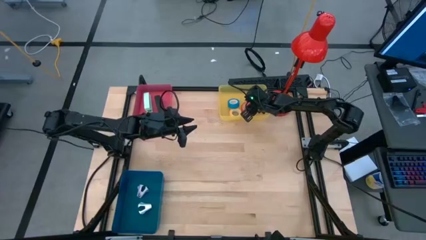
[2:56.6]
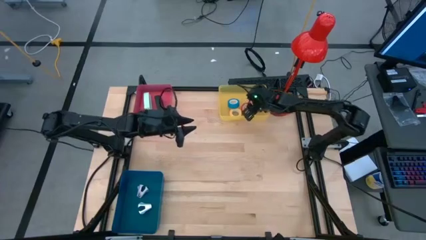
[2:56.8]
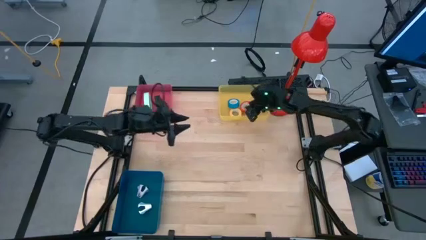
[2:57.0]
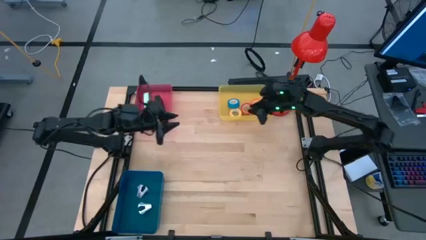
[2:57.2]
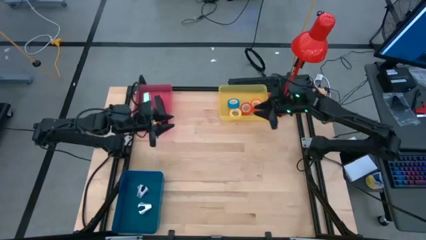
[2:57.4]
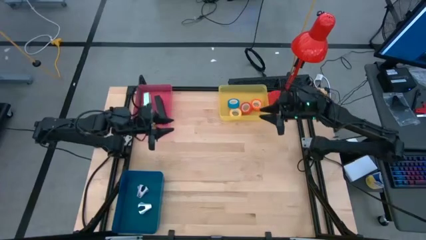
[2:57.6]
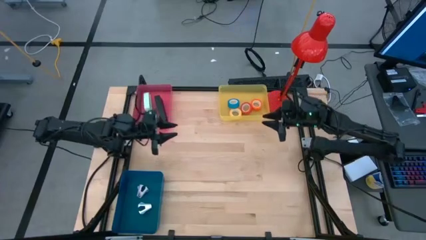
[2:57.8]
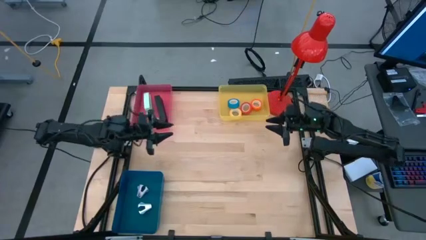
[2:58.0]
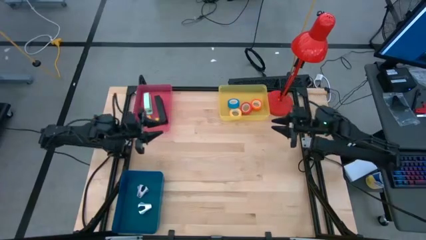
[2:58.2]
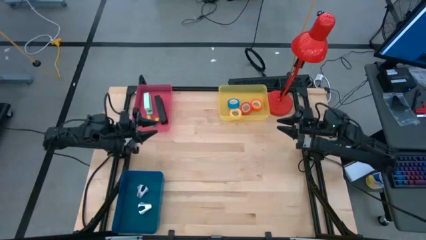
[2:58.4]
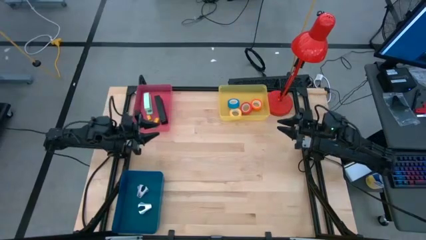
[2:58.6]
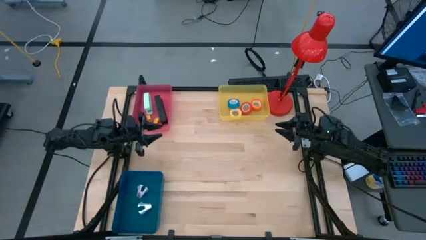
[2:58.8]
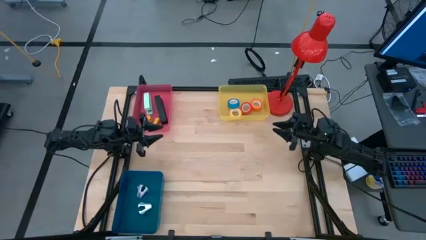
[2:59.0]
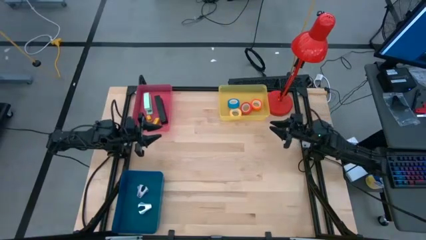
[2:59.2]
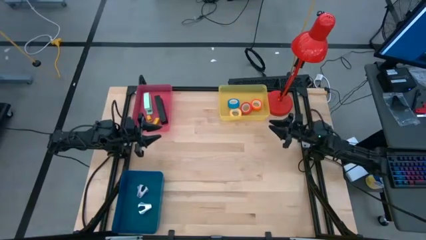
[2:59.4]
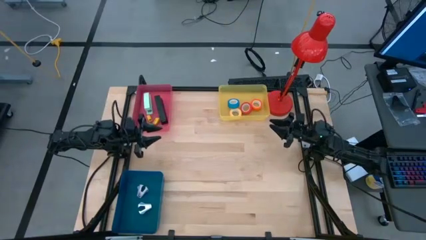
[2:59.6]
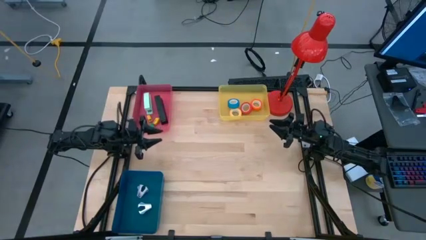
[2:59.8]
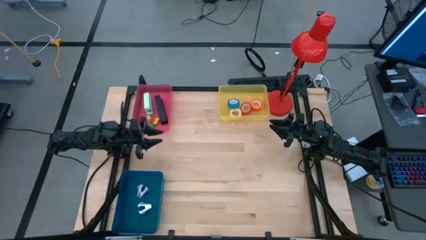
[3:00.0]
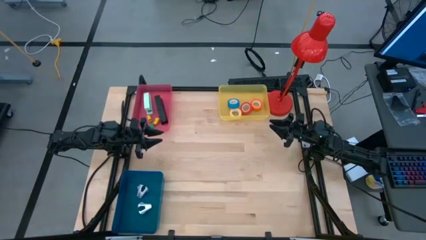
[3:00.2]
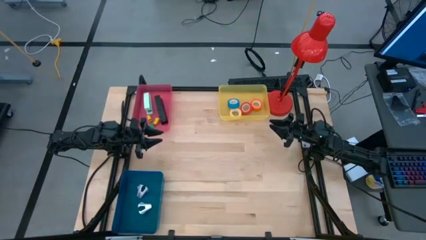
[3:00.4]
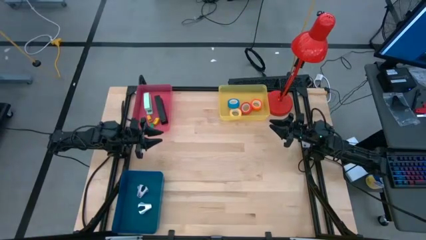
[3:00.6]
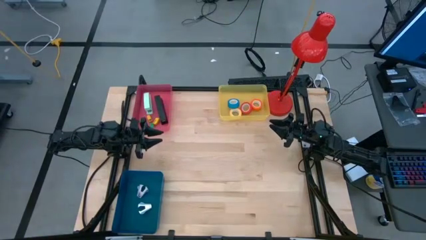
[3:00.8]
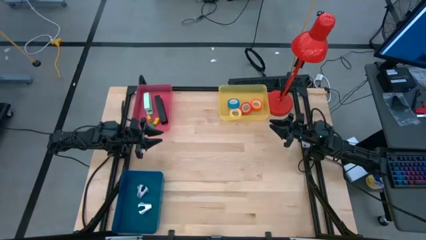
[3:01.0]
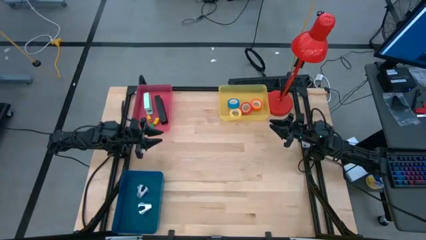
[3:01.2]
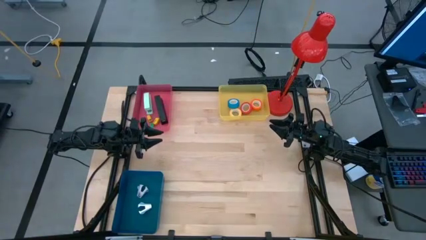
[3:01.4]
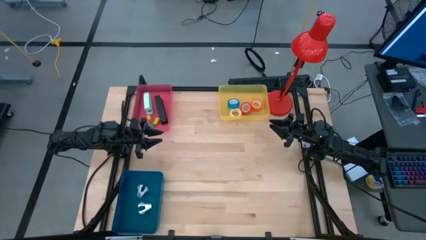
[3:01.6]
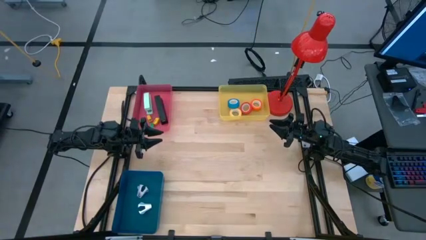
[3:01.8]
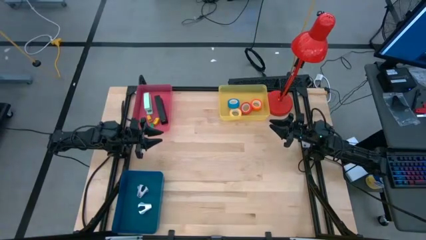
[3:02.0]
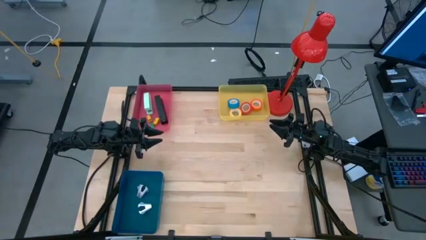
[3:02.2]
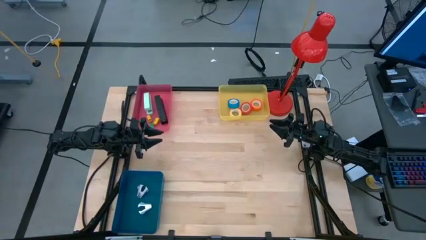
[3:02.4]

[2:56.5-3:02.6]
Task: Pick and place Stapler, Stapler remover, tape
Return to Home Position

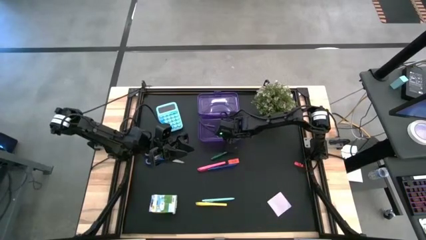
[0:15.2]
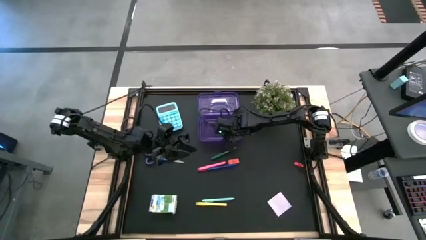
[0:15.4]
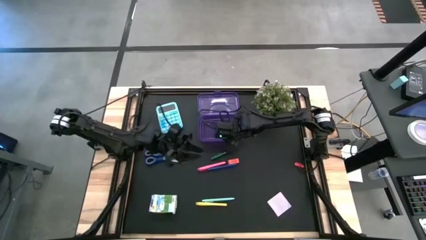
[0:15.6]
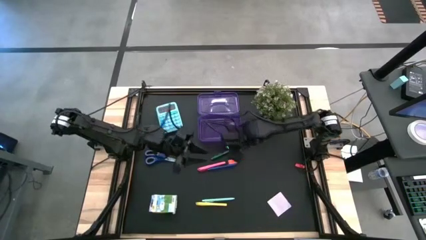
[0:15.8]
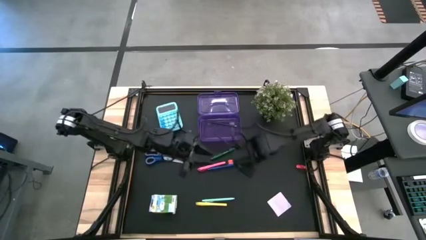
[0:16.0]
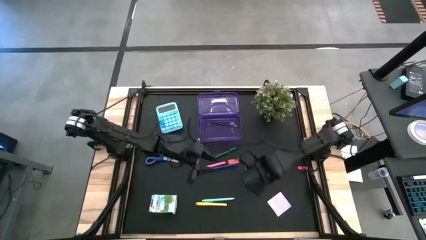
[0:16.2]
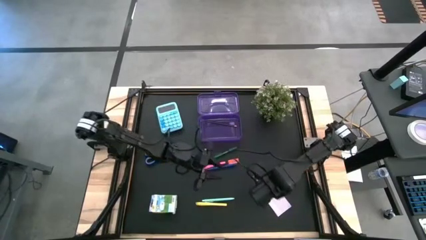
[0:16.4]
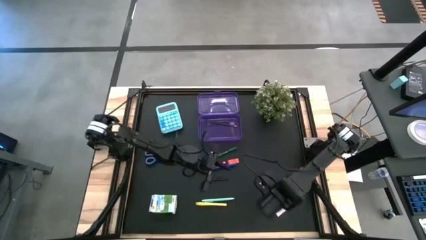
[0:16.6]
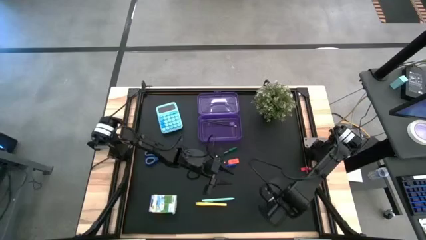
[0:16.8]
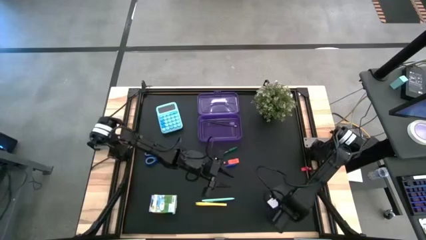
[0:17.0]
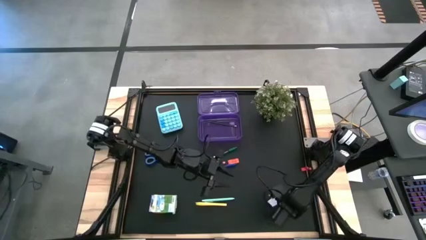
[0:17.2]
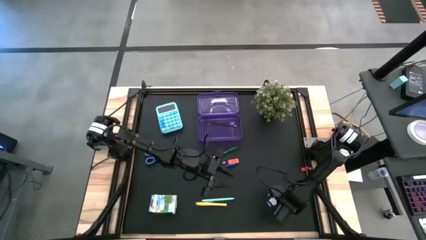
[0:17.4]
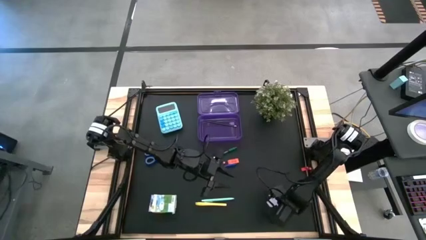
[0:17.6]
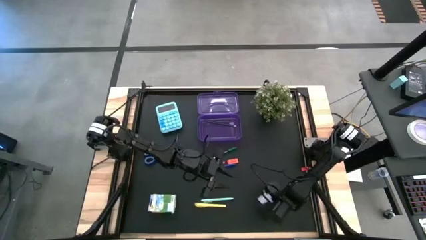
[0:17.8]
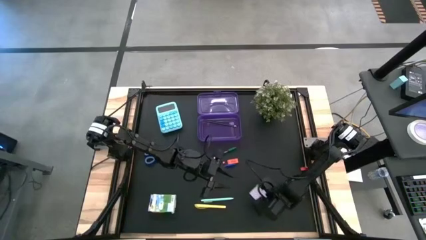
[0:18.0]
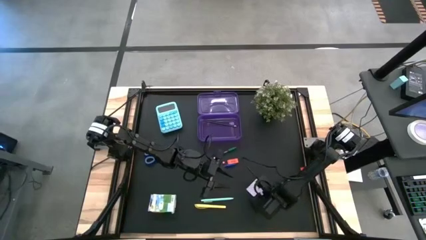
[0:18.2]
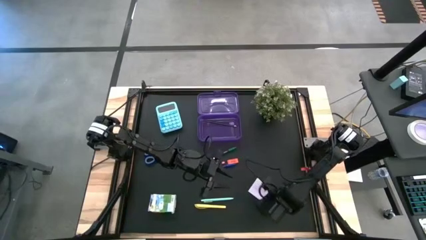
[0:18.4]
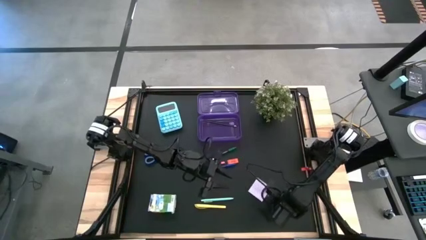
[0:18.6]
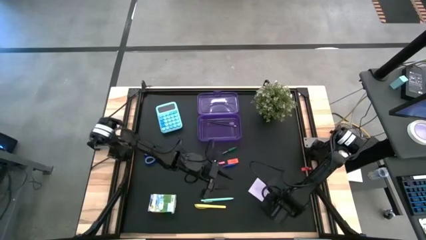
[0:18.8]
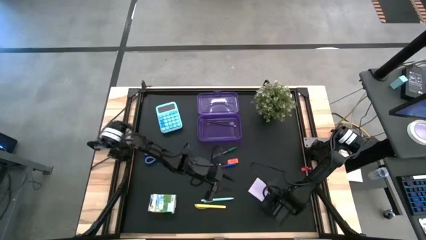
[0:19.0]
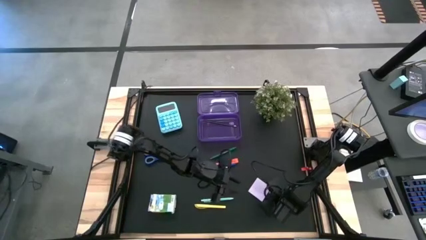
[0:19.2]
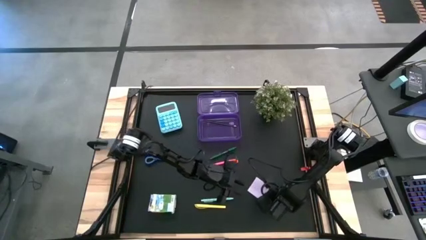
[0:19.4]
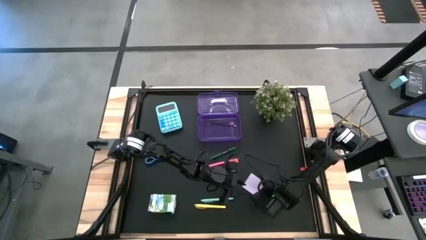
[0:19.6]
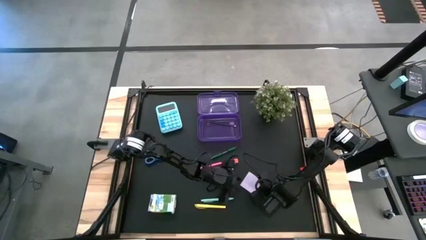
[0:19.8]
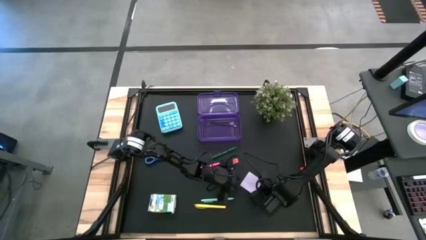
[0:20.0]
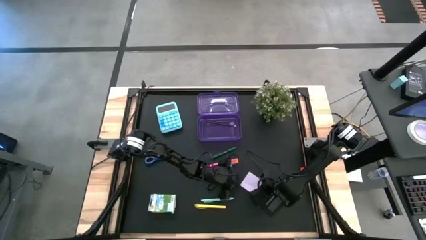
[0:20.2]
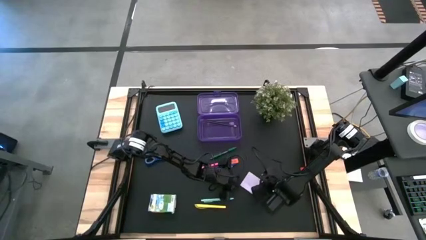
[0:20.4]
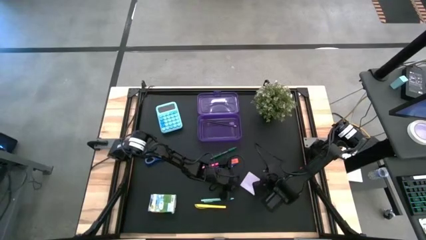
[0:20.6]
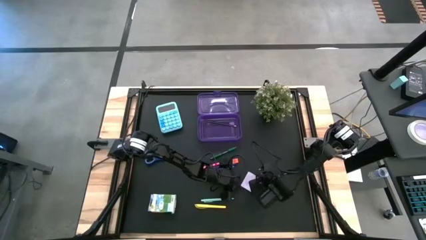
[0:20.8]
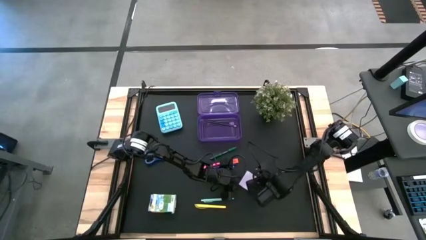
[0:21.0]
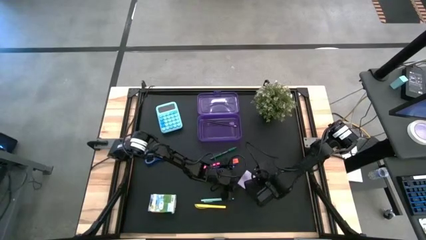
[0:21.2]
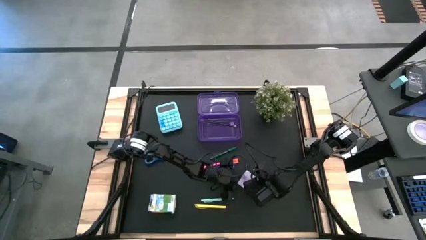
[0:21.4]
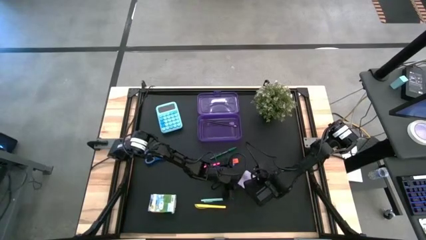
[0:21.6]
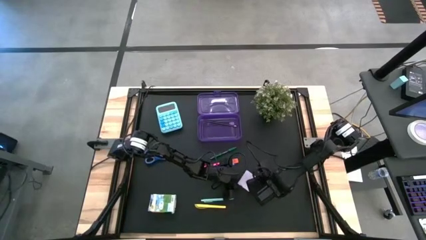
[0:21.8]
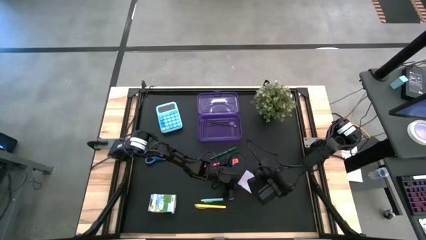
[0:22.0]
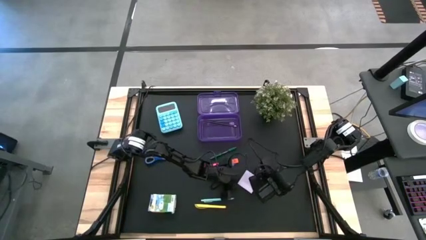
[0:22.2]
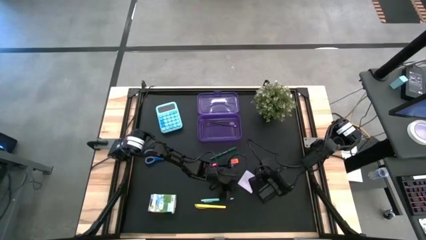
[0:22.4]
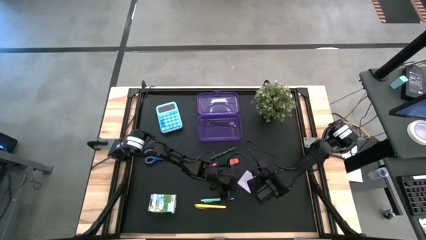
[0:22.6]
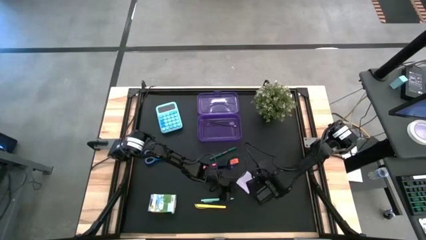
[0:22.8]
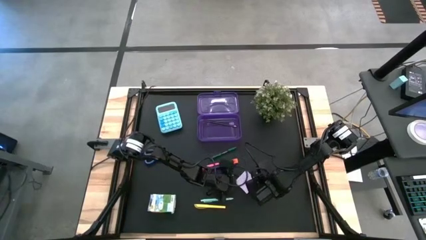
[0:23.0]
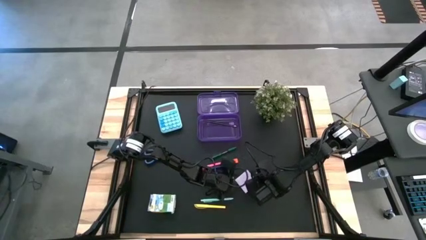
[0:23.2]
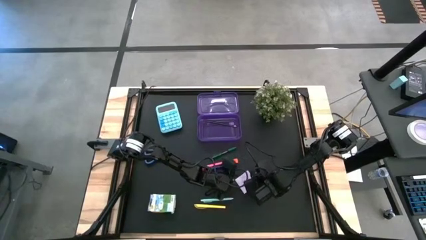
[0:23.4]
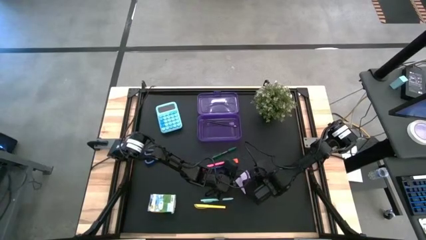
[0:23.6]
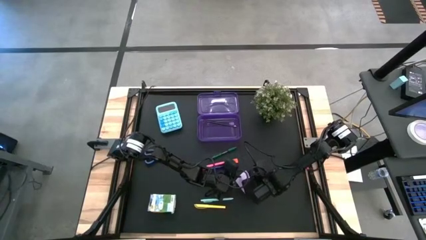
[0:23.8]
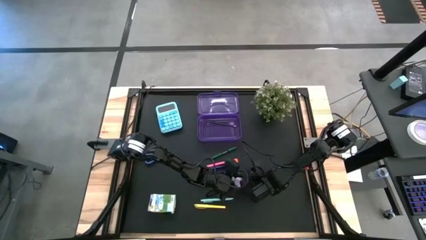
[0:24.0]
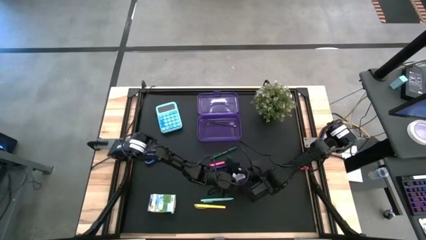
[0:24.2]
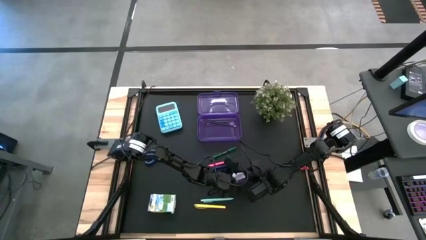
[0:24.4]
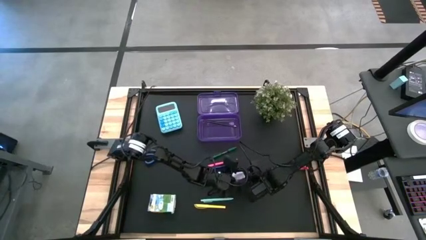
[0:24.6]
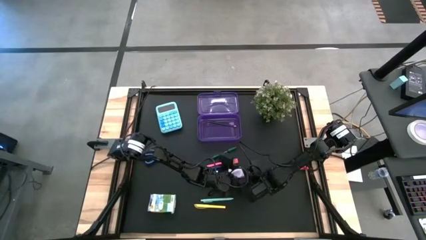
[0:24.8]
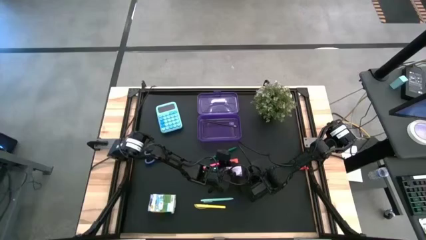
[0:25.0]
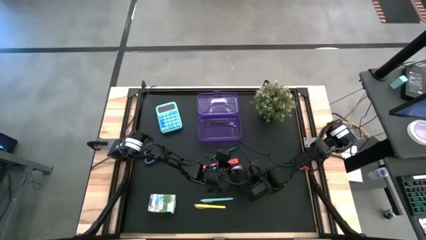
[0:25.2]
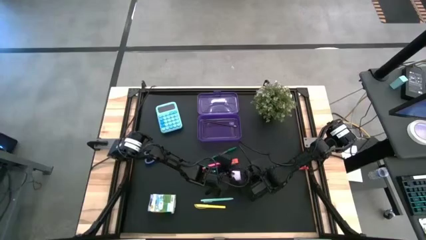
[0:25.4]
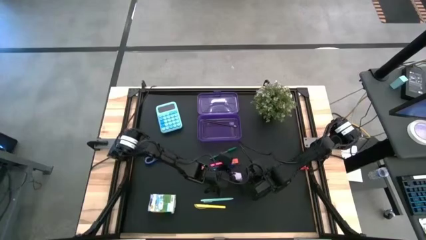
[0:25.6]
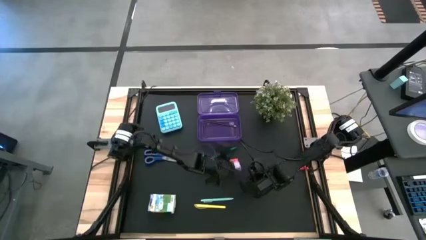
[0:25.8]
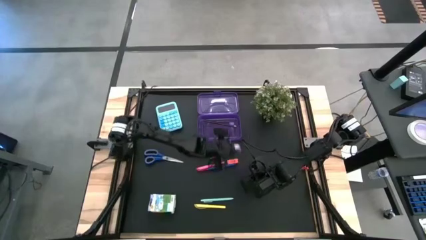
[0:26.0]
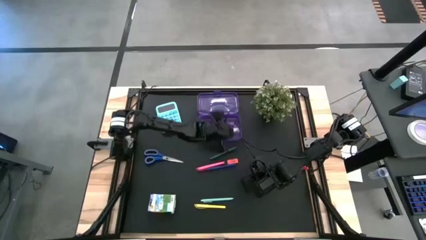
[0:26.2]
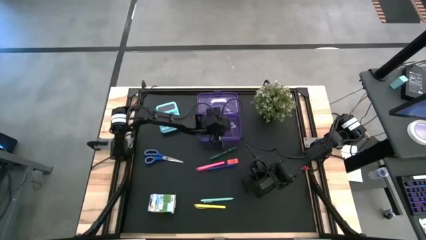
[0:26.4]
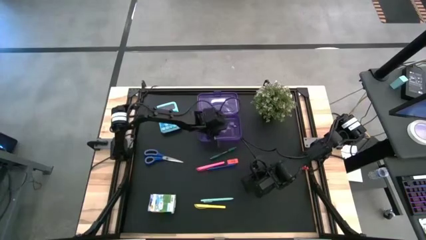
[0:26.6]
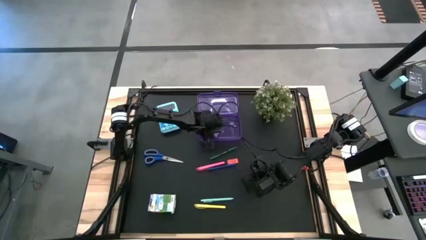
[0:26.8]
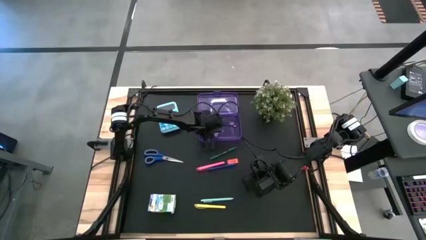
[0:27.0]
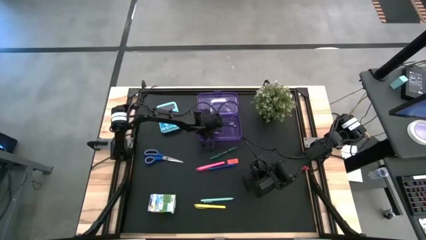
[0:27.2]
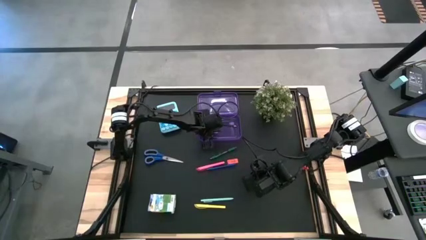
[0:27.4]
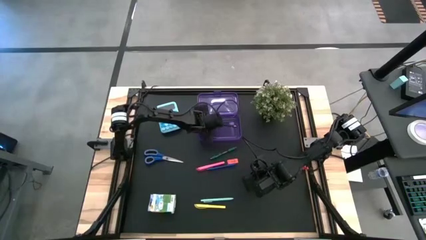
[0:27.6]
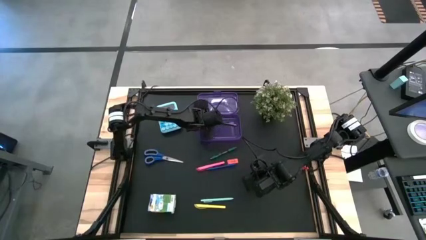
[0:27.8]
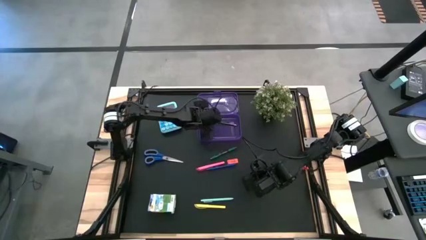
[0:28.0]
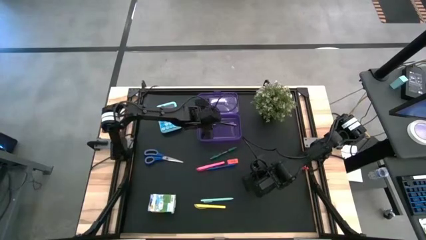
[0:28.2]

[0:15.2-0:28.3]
Task: Pack school essentials
Put the white sticky note into the purple supply box
